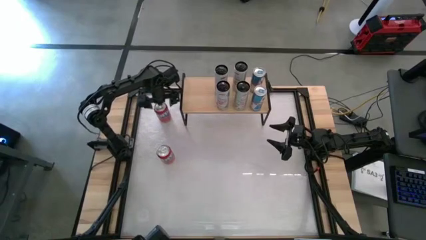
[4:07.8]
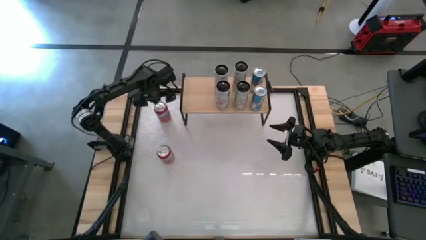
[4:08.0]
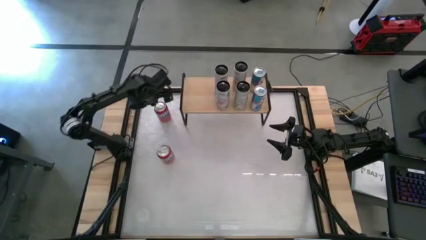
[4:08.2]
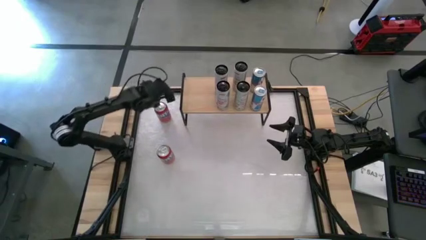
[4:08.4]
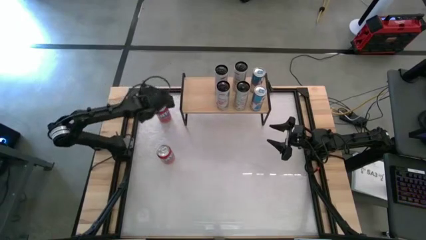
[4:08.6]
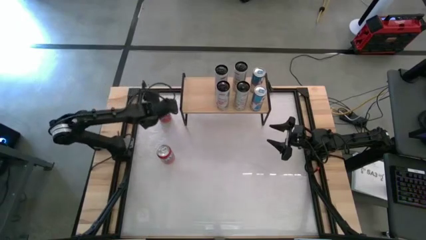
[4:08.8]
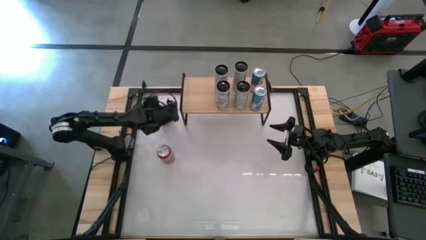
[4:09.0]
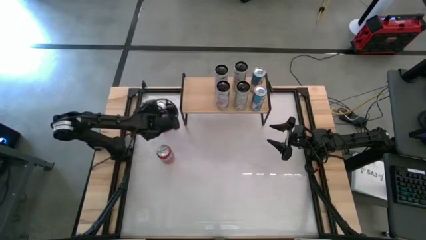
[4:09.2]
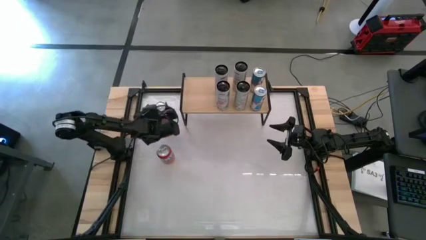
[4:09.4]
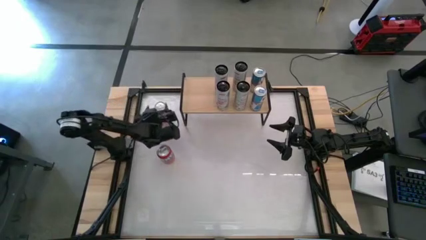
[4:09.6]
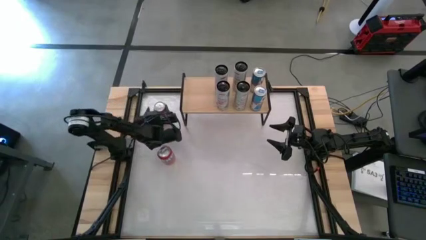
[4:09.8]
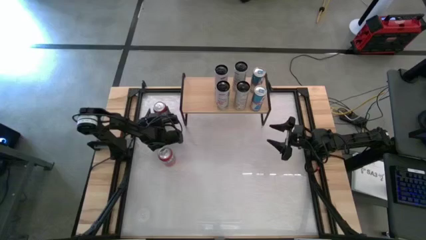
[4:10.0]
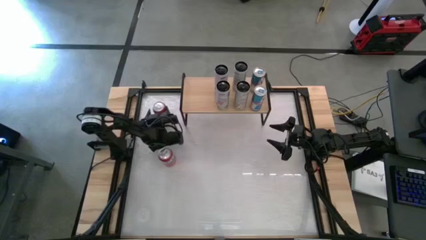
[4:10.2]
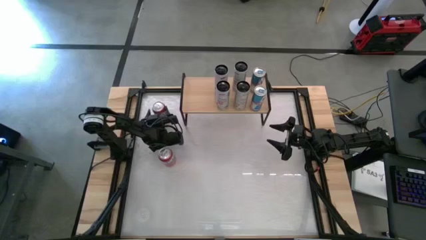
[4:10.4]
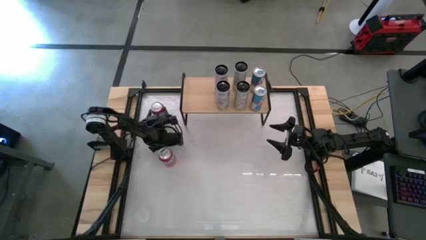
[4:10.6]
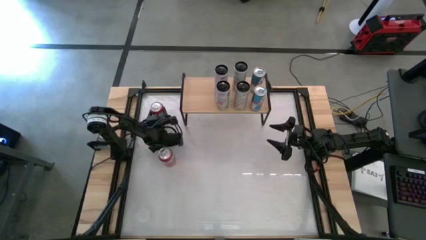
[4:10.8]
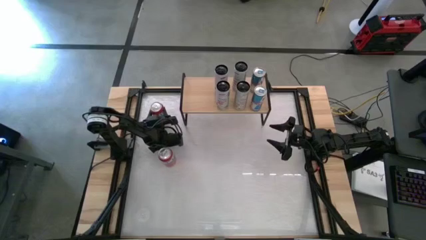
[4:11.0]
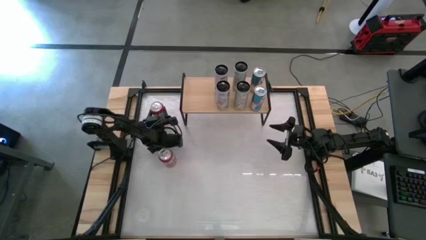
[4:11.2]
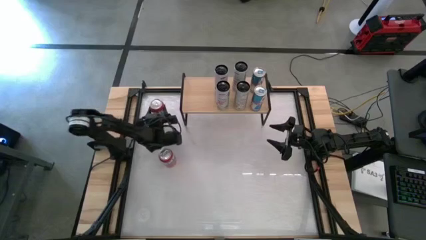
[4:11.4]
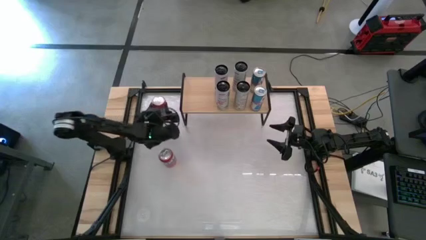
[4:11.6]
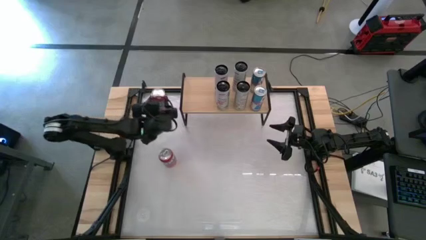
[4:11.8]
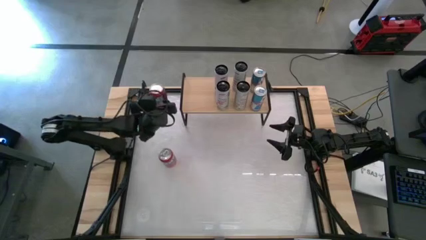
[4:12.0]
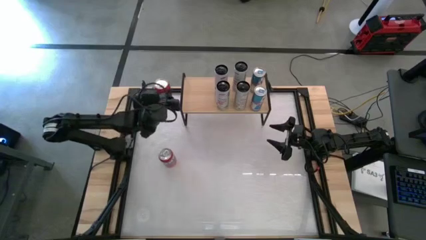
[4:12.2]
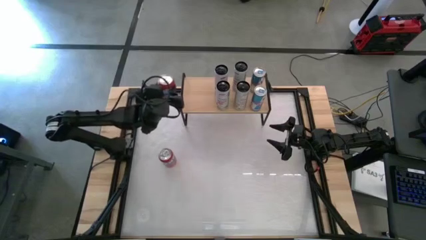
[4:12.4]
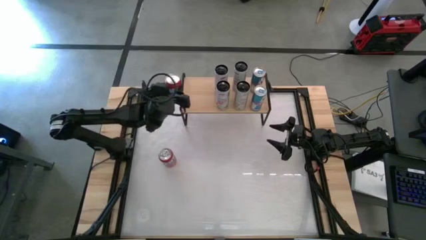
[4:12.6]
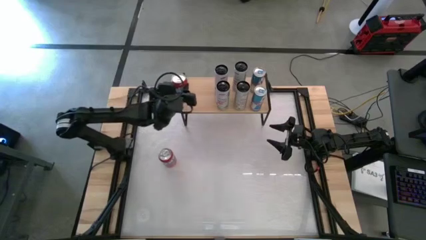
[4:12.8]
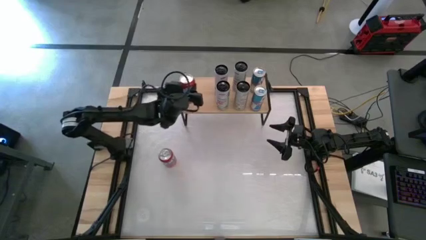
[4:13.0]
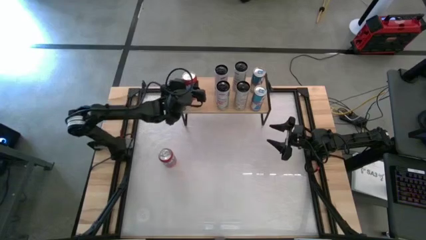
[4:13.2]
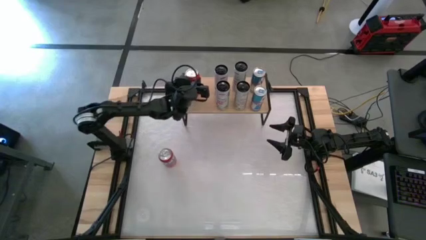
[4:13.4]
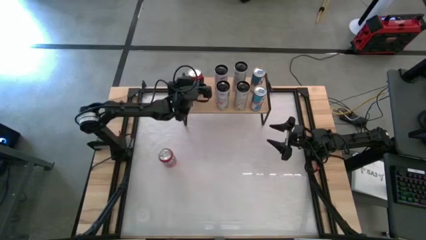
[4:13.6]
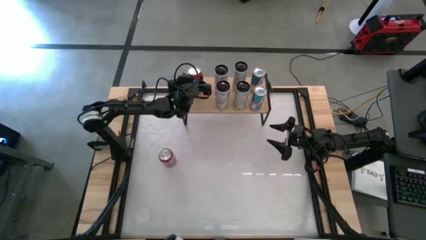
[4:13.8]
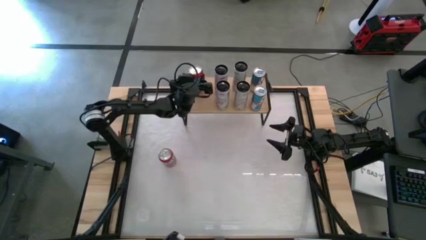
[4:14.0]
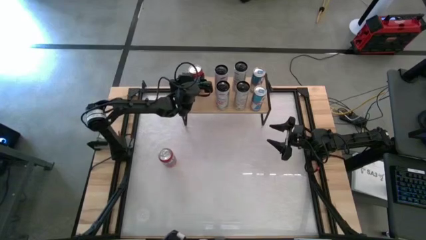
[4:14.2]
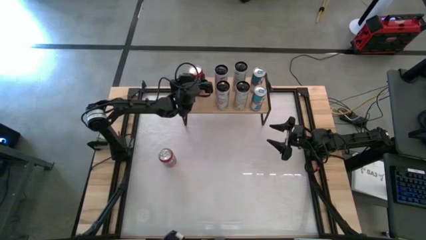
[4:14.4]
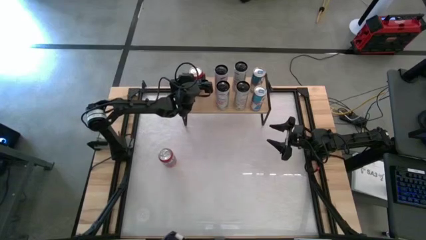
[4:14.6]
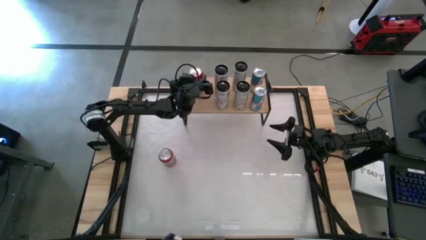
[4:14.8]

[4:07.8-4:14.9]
Task: Place canned beverage on shelf
Put the top orange soda can on the shelf

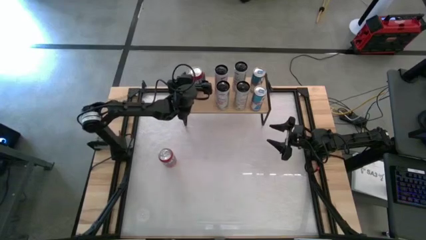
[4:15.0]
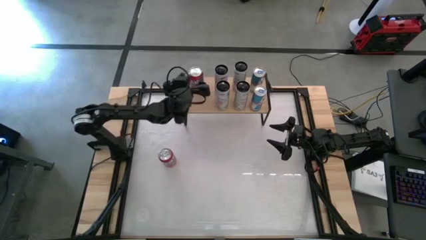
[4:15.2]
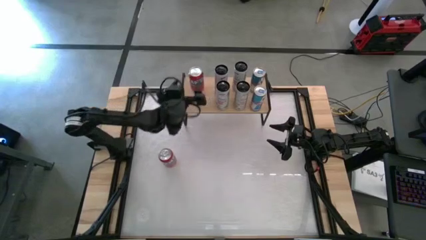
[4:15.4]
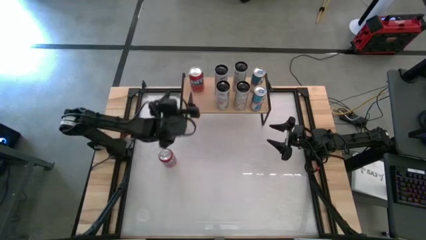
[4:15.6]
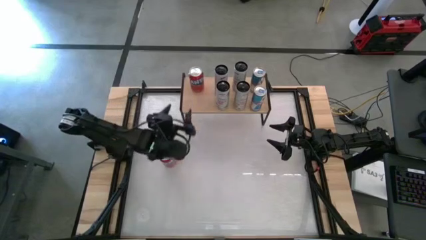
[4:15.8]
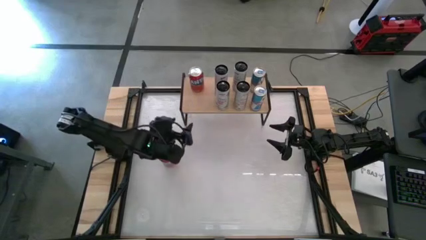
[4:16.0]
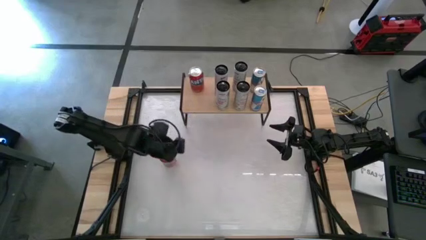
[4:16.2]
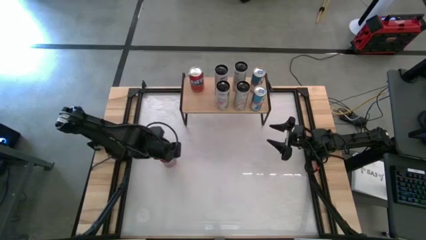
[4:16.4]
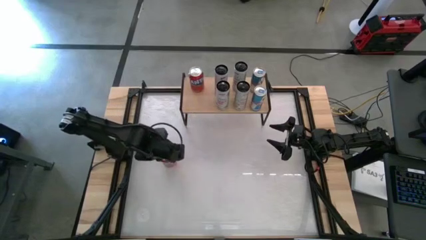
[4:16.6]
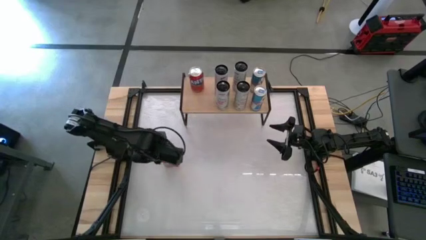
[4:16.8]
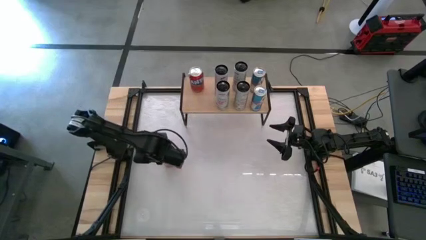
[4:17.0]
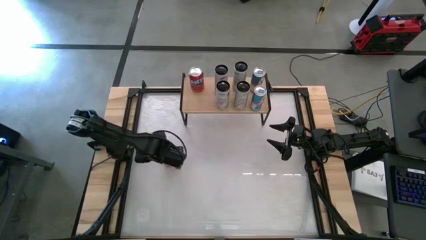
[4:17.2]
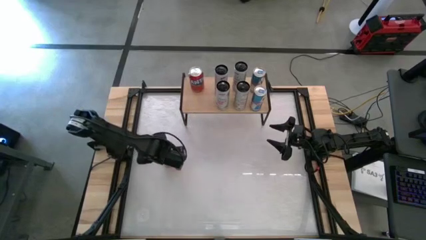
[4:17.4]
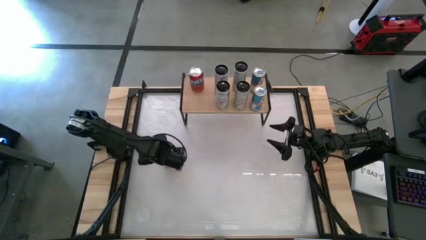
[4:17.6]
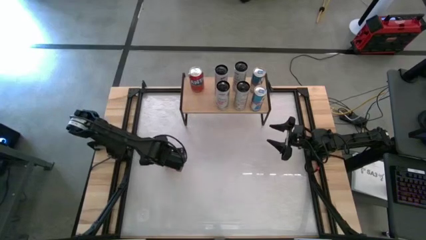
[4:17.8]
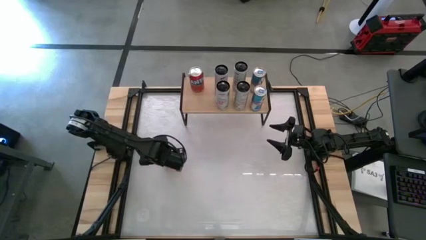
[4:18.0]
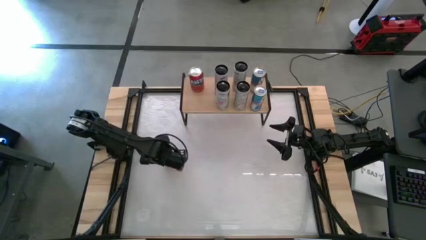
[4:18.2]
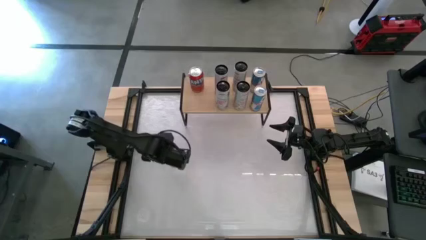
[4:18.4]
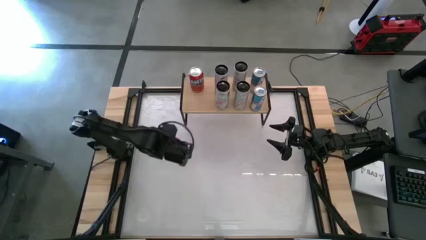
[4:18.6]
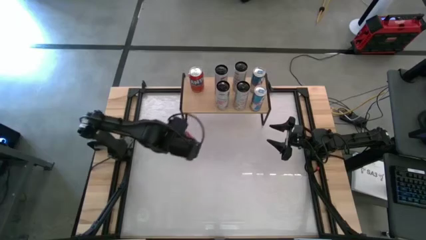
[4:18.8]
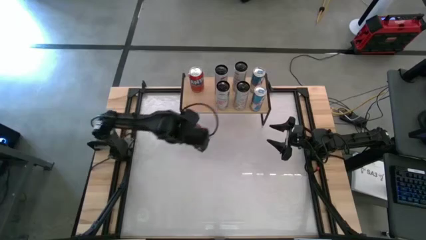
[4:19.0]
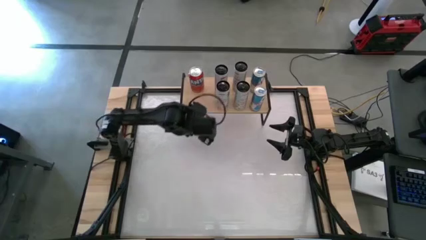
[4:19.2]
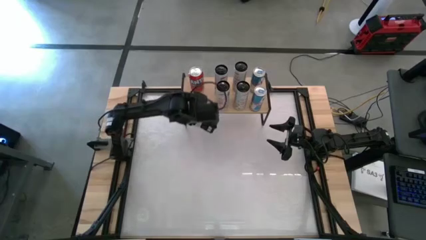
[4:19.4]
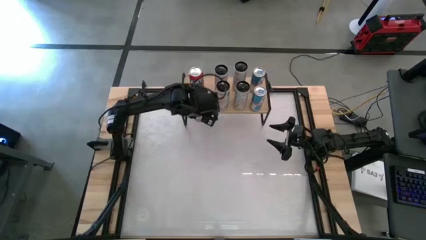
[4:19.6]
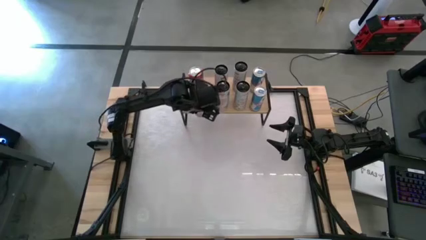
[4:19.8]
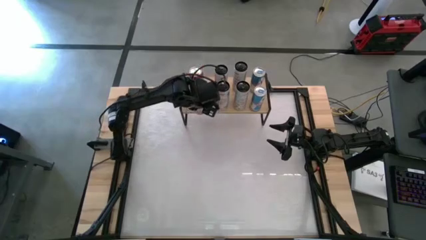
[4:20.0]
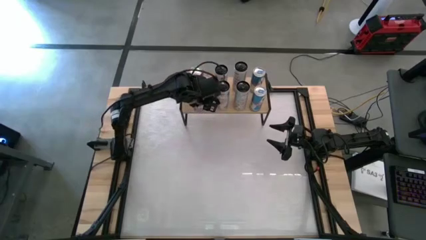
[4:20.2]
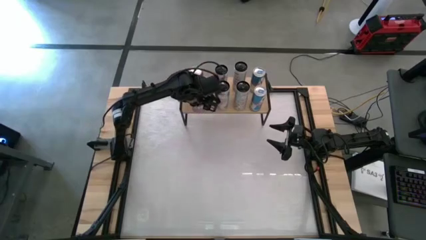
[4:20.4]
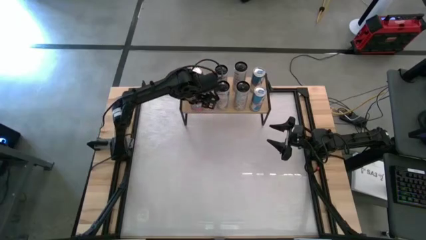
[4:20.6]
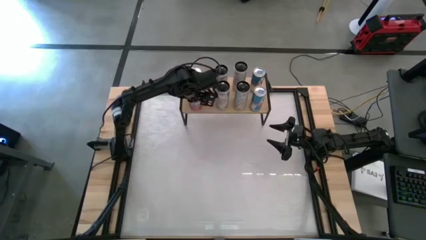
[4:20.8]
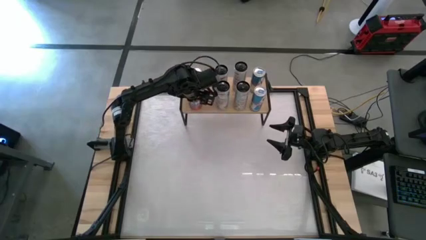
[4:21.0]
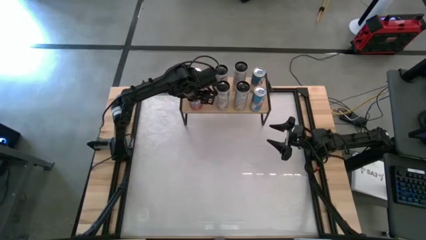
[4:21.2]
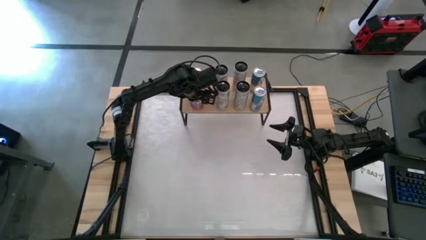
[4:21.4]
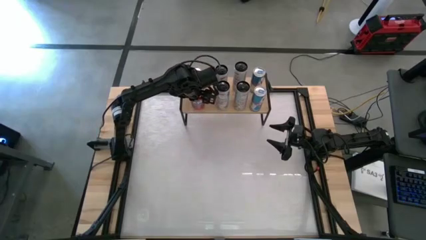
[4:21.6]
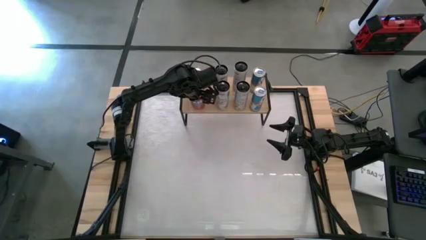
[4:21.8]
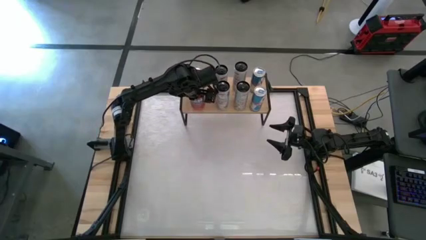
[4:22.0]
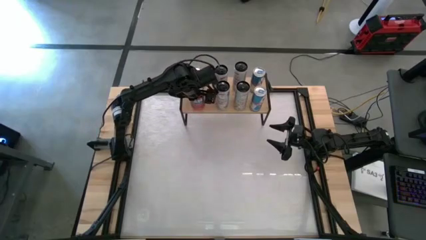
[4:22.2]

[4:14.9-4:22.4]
Put the orange soda can on the shelf aligned with the other orange soda can

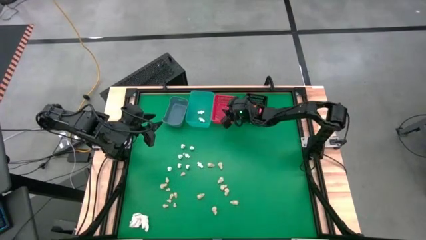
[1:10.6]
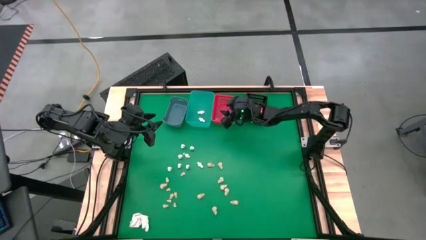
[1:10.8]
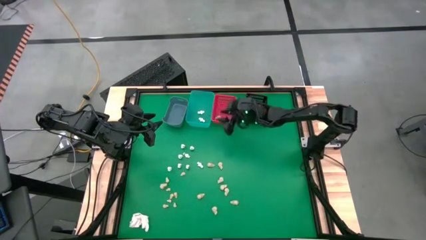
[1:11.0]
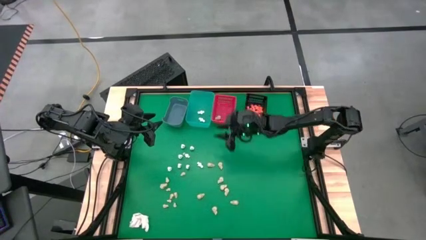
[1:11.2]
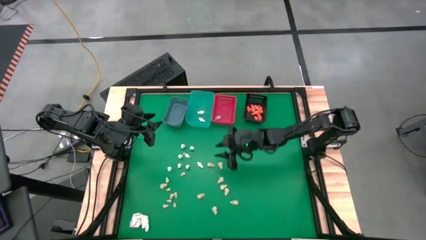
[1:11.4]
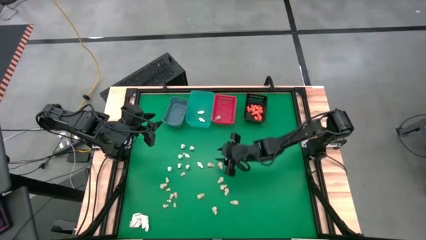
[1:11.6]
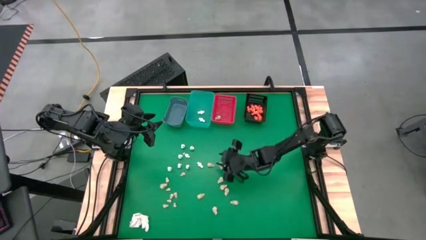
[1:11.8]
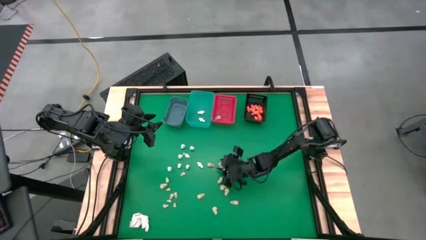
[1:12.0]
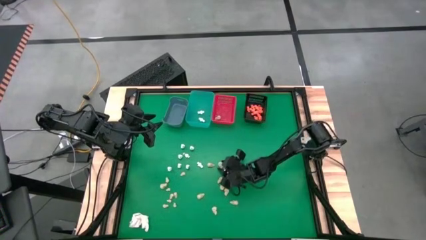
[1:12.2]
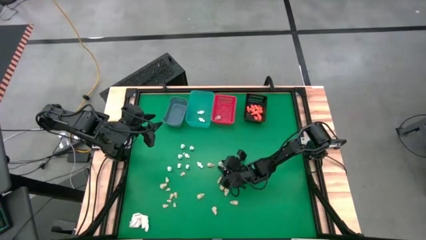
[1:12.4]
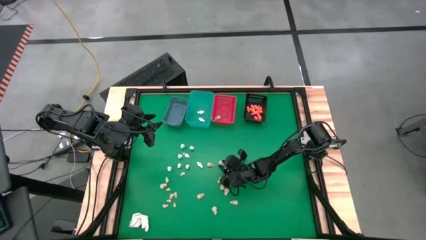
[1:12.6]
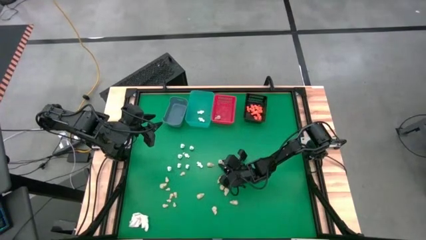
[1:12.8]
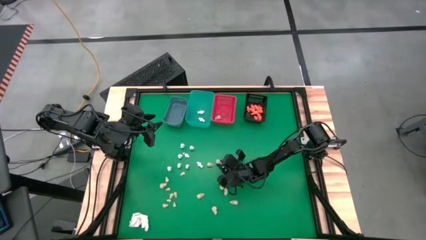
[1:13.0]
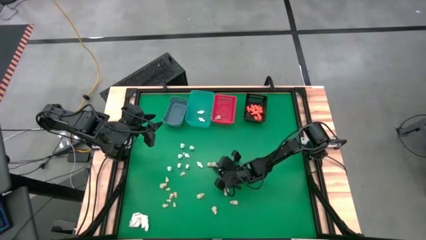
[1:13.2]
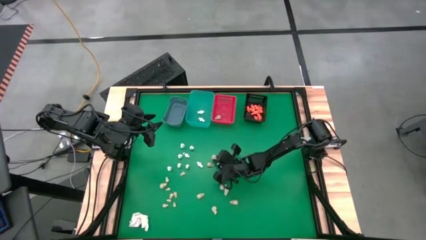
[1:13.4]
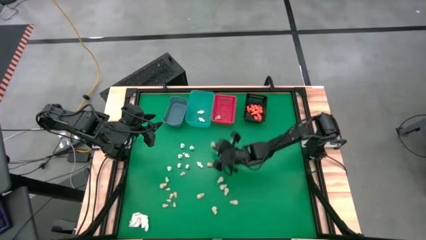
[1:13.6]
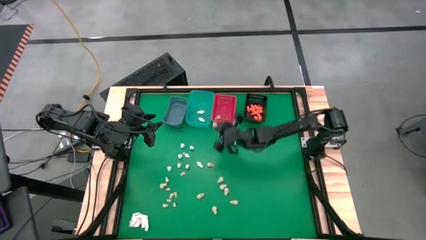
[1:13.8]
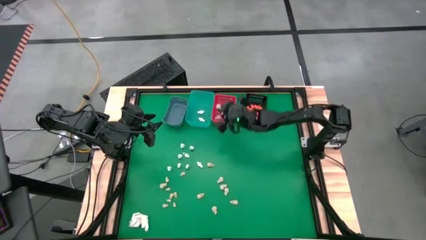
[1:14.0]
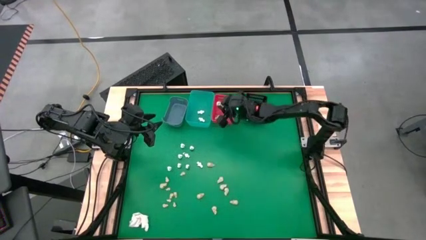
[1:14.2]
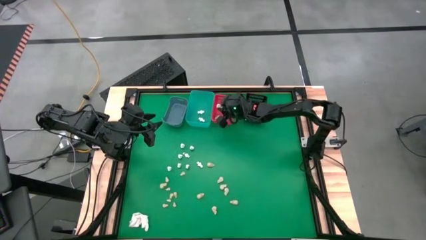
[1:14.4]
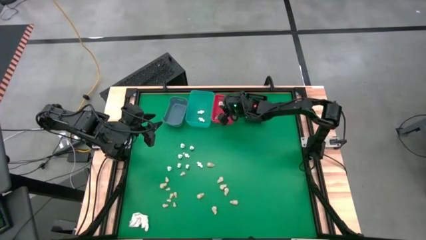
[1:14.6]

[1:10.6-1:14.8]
Task: Sort Halloween decoration
Put the white skull toy into the red bin
